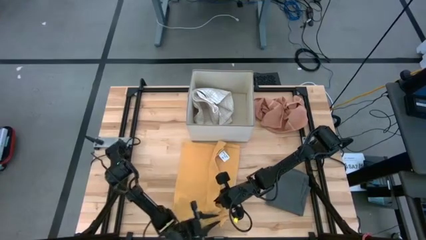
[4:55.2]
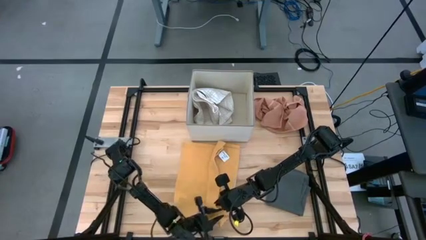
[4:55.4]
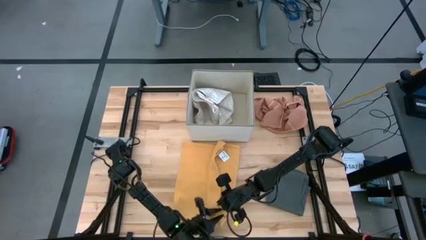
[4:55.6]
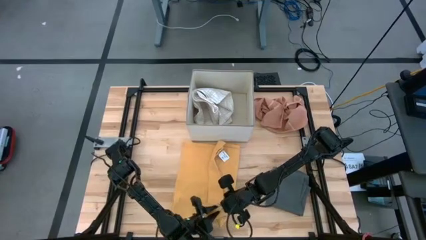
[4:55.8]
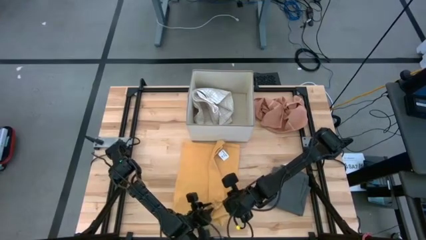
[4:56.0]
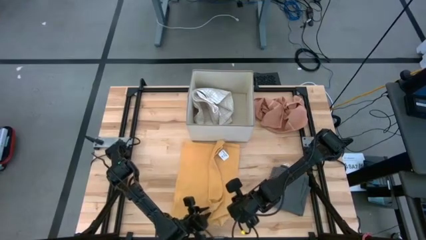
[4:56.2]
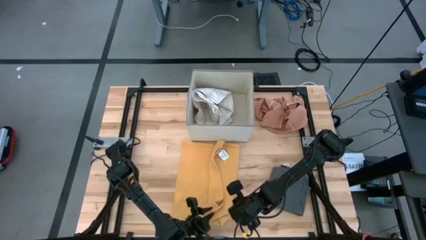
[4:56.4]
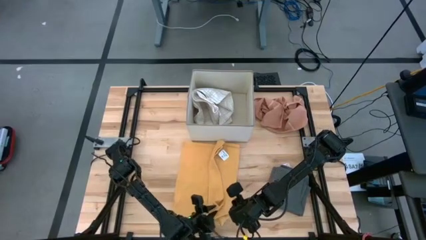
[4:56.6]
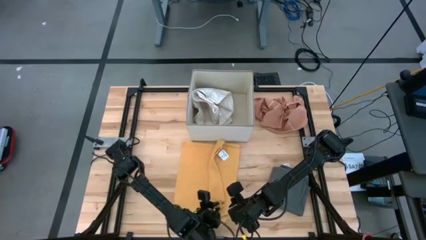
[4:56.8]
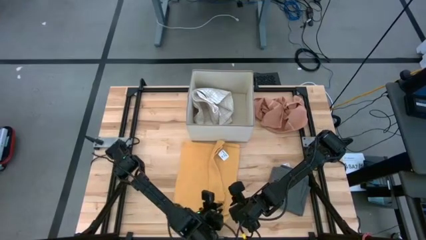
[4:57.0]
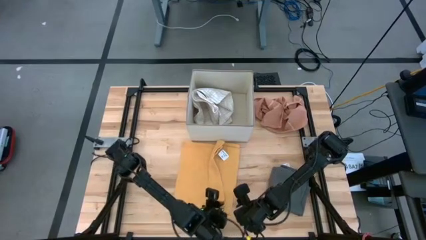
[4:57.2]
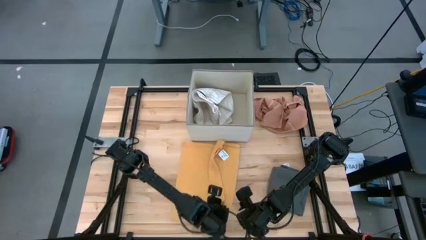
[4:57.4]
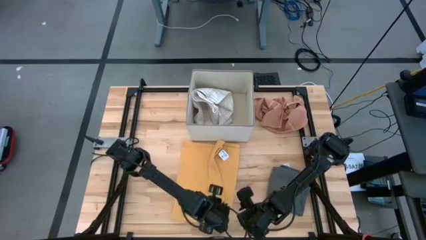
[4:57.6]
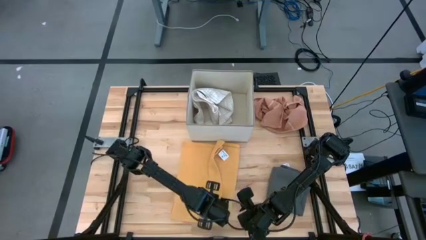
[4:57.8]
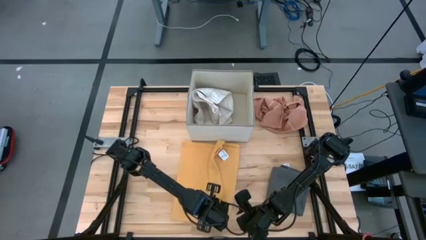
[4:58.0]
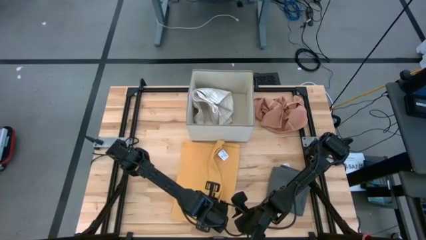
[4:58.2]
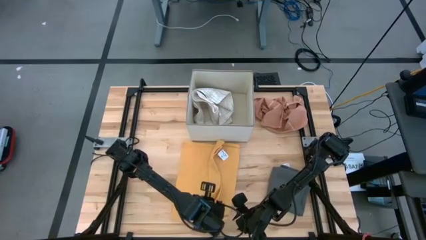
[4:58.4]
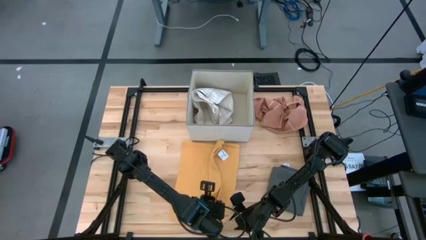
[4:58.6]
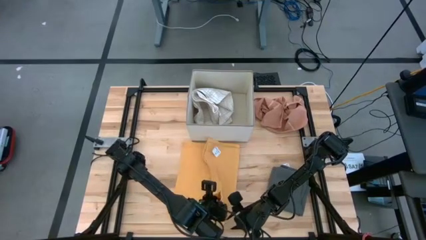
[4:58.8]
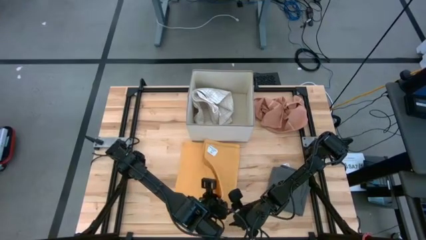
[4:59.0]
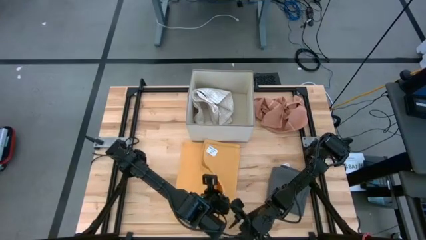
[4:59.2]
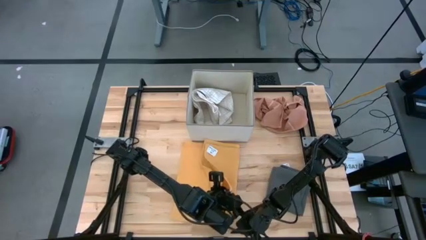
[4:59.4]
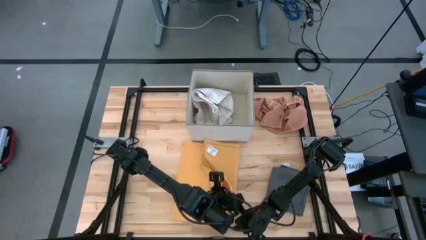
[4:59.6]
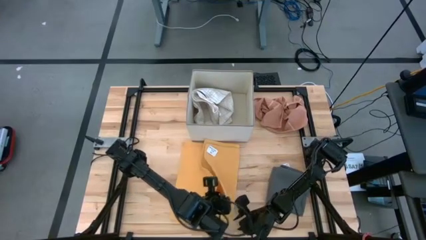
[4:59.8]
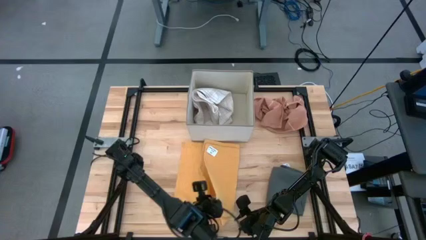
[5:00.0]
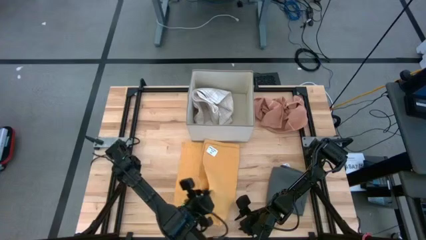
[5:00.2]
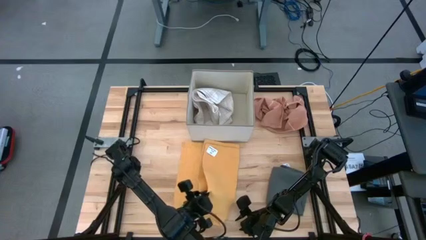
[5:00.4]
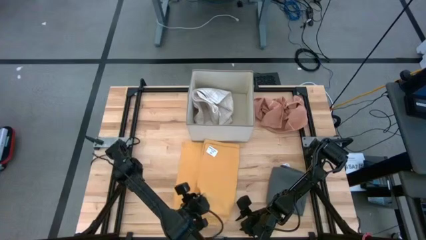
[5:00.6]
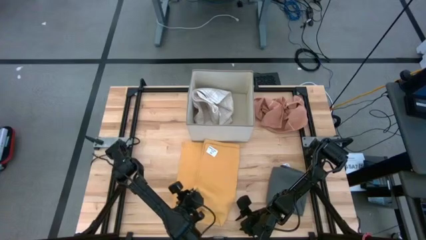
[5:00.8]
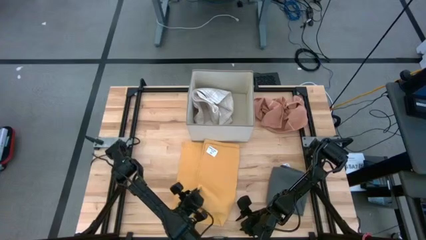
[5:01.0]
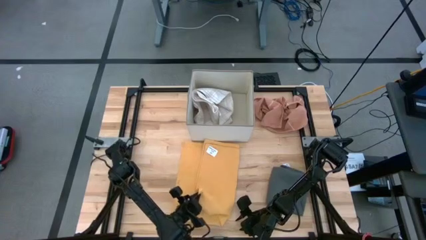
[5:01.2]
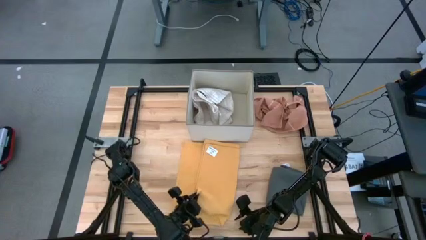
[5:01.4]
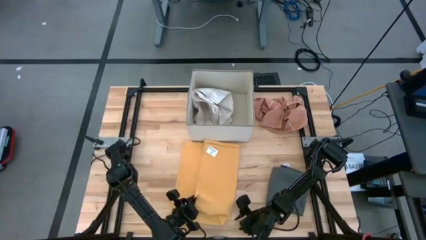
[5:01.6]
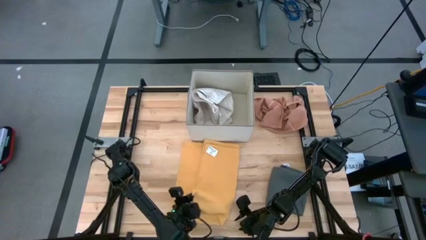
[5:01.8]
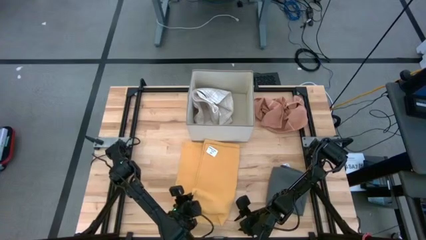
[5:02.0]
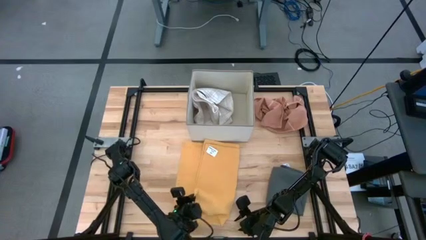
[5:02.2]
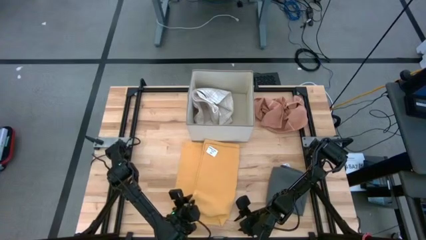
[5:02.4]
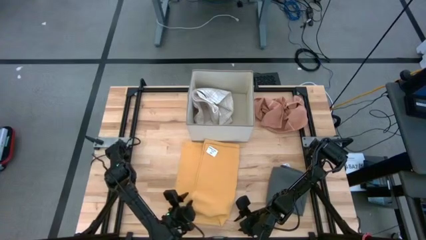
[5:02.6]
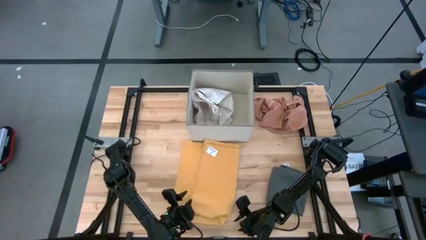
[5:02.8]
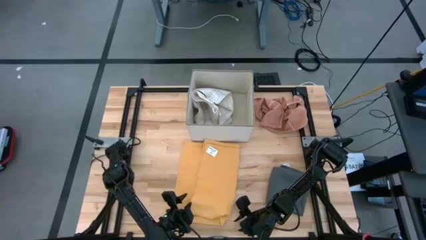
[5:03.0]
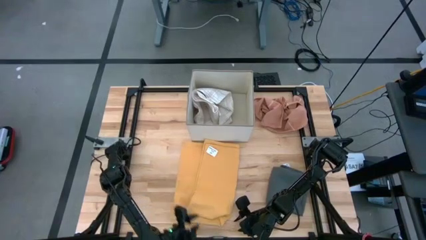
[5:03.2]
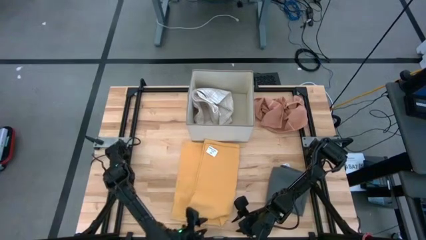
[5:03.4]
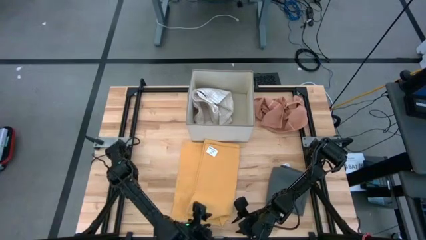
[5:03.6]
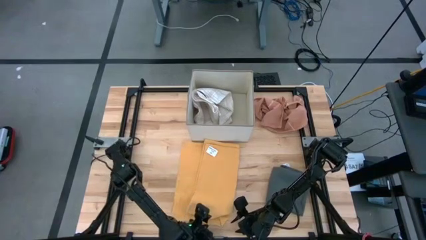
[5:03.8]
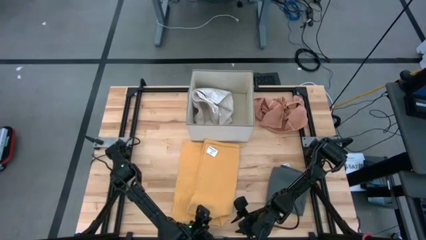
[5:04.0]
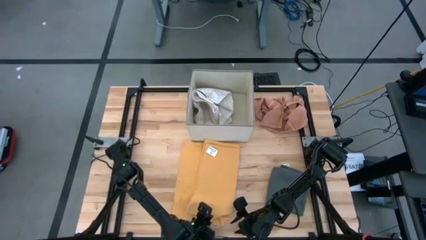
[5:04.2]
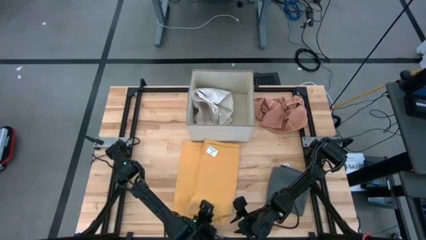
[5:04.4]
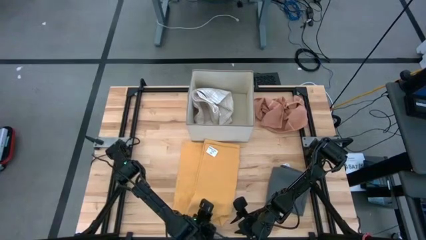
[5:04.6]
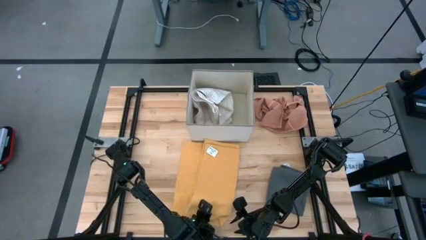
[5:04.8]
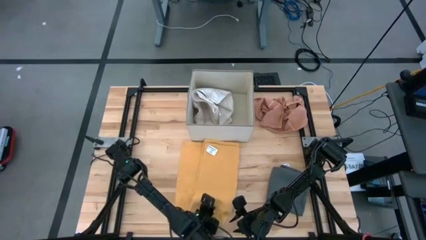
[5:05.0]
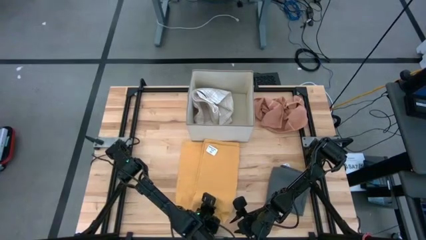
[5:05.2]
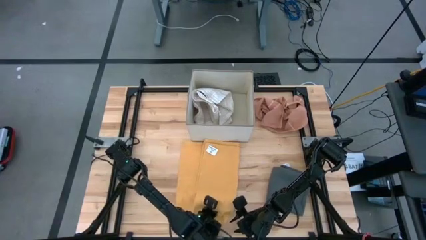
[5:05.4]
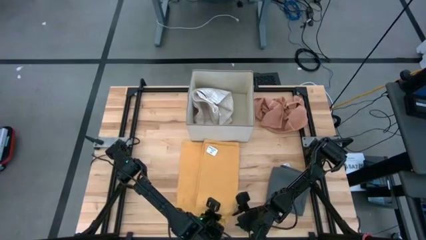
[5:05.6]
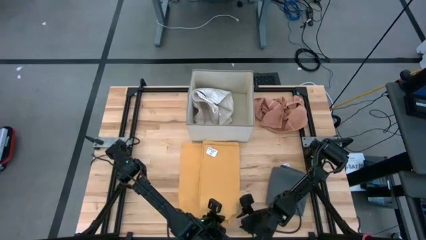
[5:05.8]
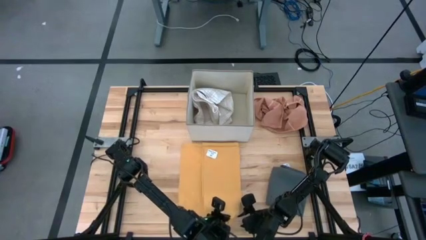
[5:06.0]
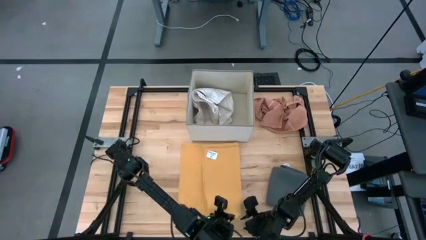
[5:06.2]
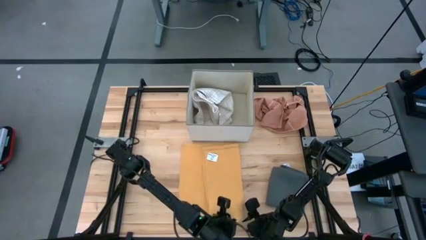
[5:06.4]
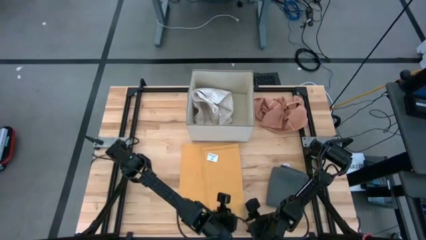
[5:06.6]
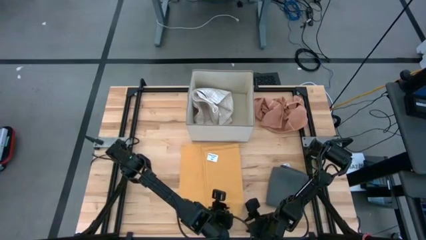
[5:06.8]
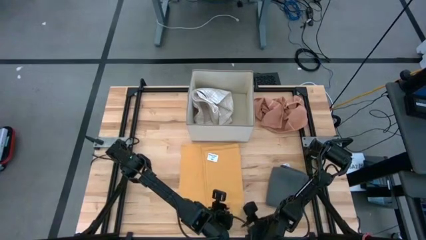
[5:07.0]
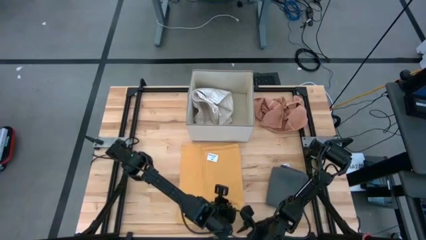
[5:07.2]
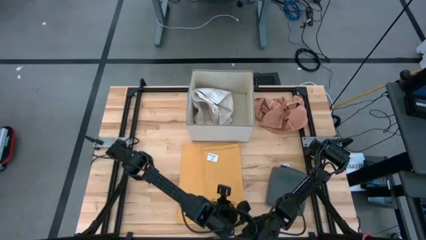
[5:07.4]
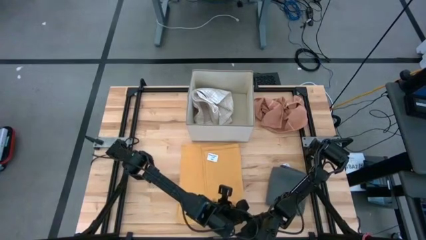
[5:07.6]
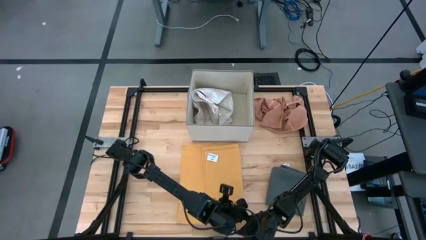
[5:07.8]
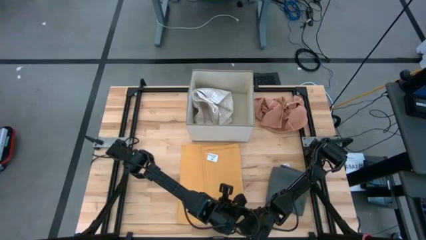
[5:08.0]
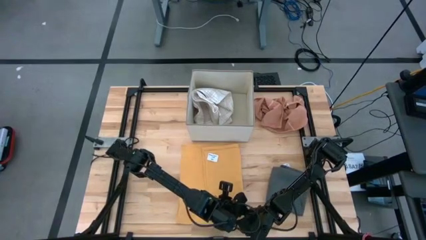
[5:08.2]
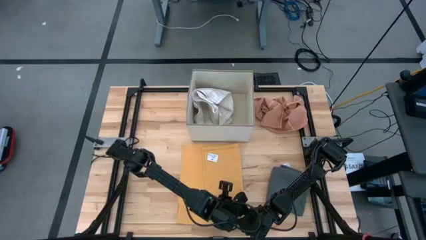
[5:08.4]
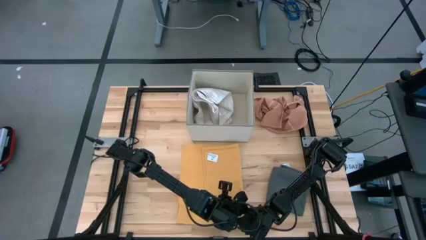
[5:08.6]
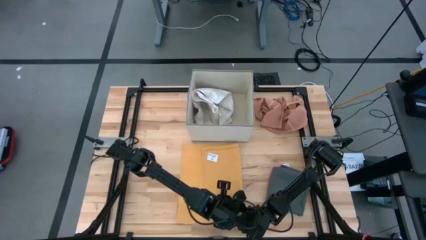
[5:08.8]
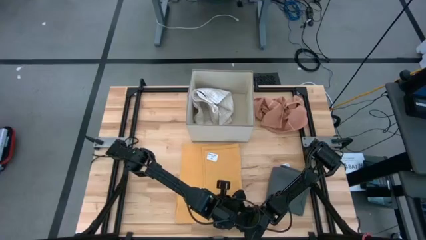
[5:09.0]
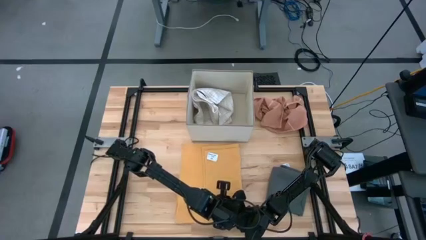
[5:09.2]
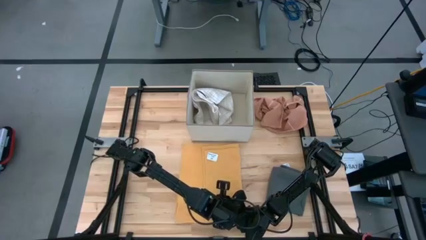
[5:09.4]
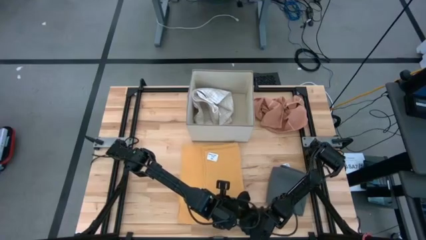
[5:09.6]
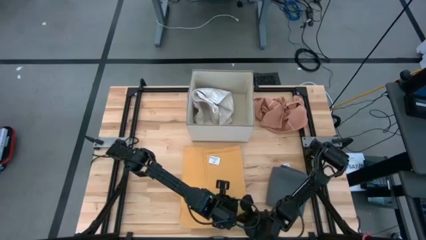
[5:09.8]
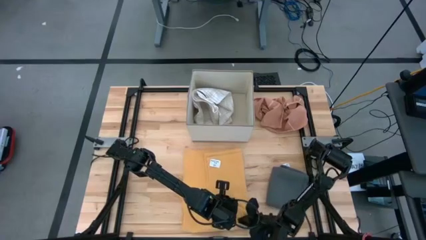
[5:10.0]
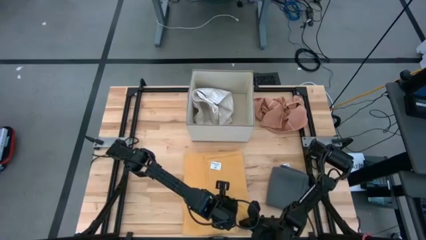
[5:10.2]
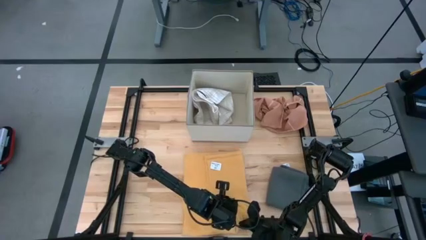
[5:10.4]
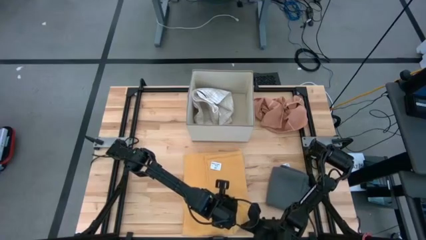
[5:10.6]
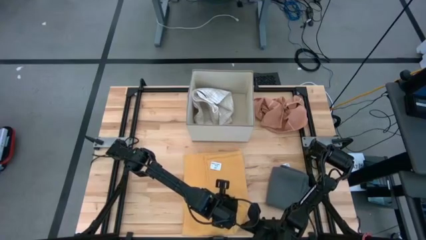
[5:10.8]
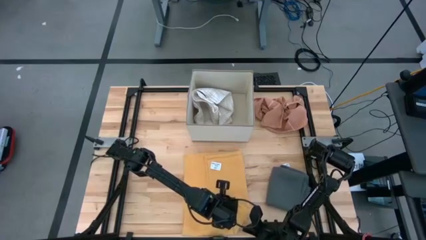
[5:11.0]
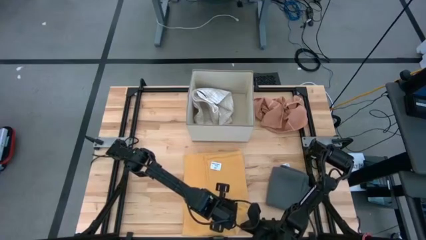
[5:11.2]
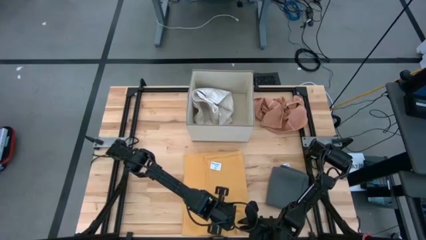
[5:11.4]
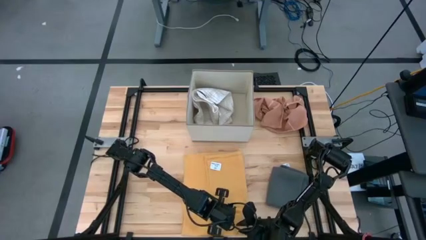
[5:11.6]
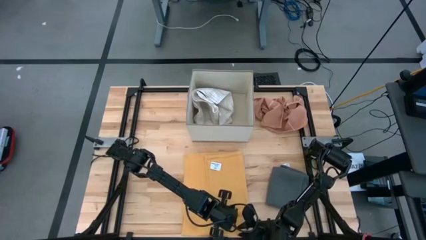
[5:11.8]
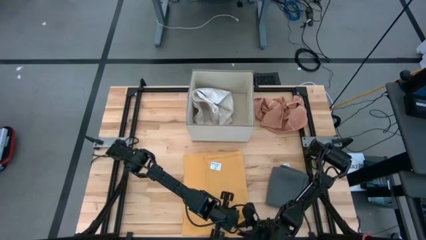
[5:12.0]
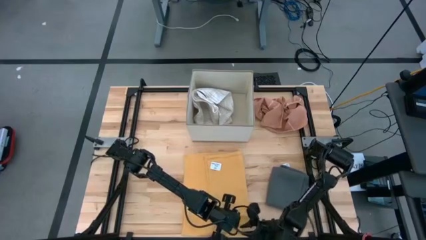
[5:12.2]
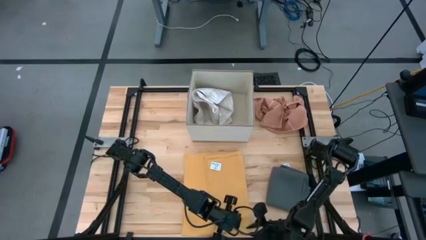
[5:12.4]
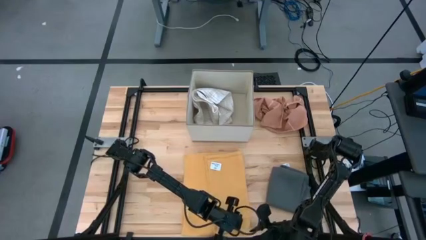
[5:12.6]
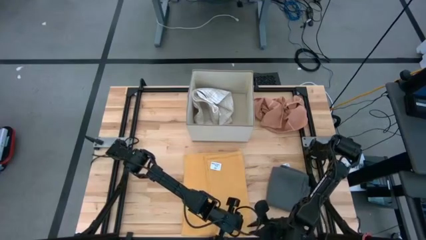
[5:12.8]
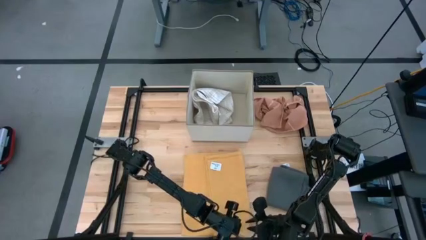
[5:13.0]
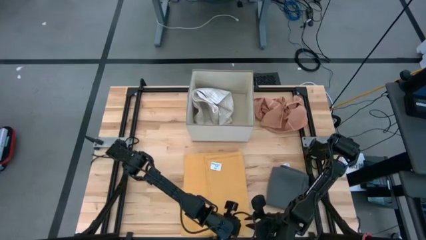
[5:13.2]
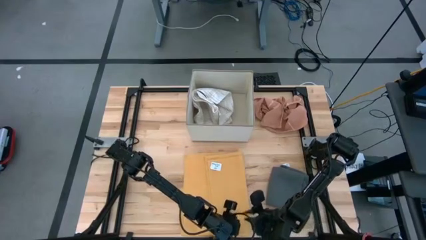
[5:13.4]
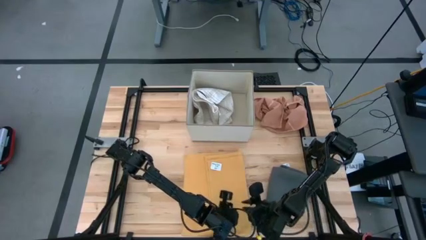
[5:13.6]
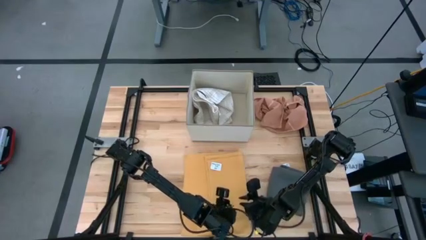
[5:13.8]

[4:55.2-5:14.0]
Task: Fold towel
Fold the yellow towel
